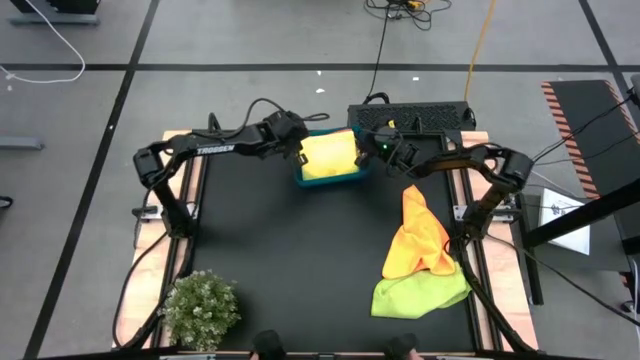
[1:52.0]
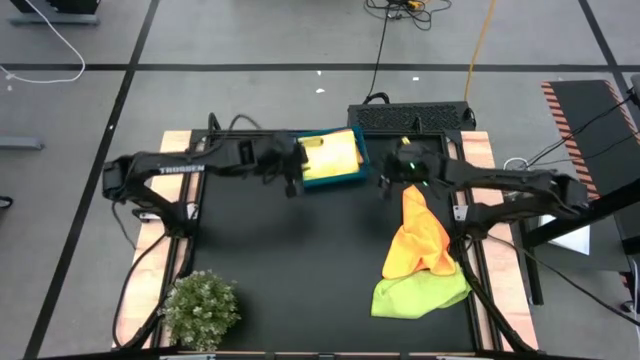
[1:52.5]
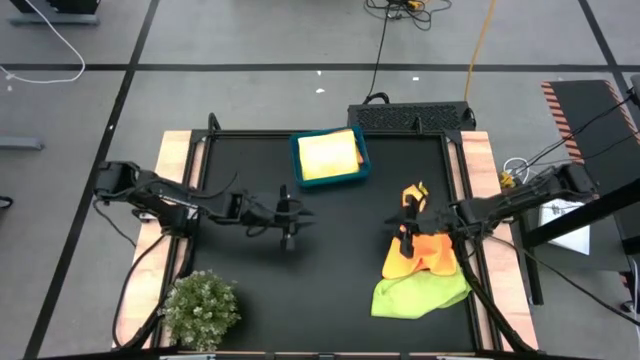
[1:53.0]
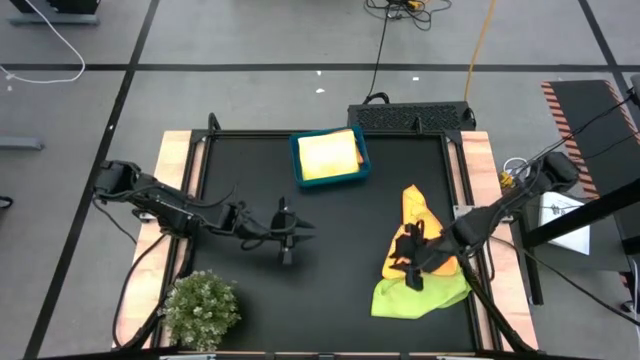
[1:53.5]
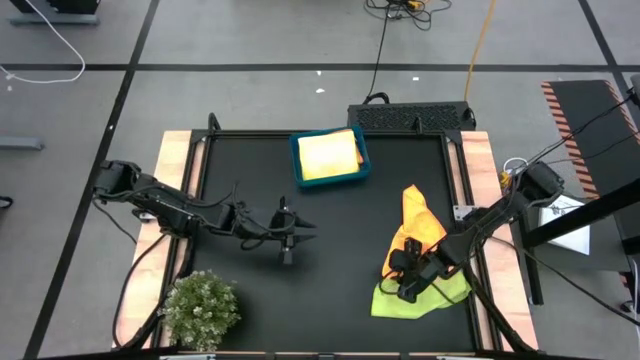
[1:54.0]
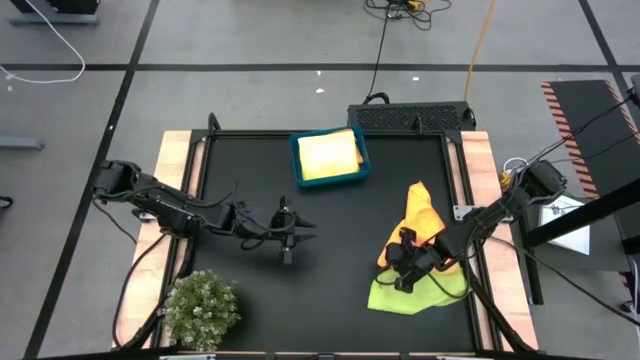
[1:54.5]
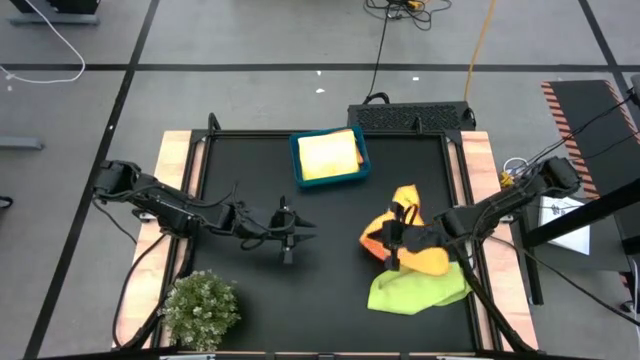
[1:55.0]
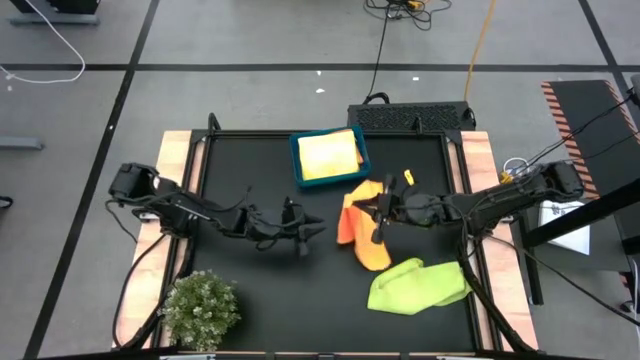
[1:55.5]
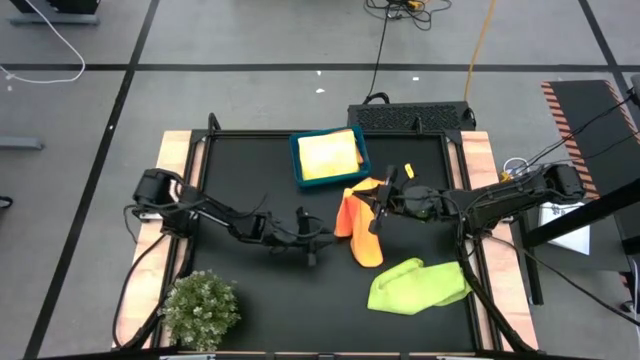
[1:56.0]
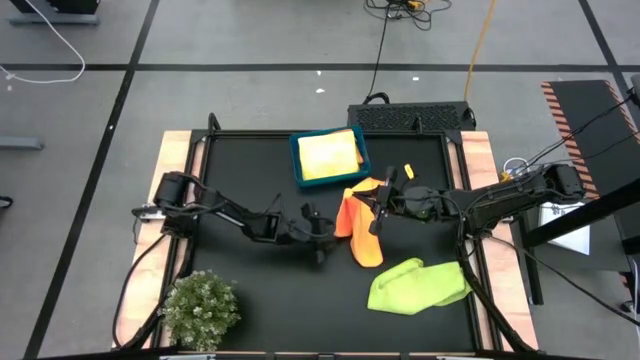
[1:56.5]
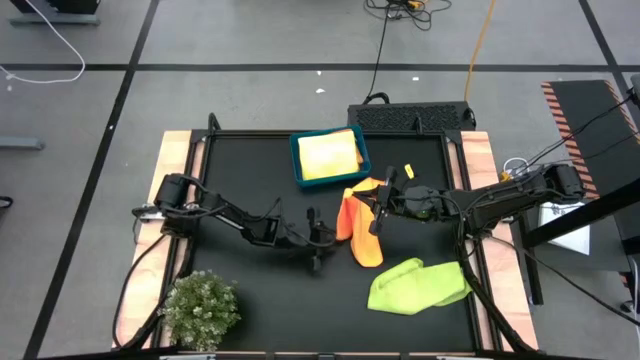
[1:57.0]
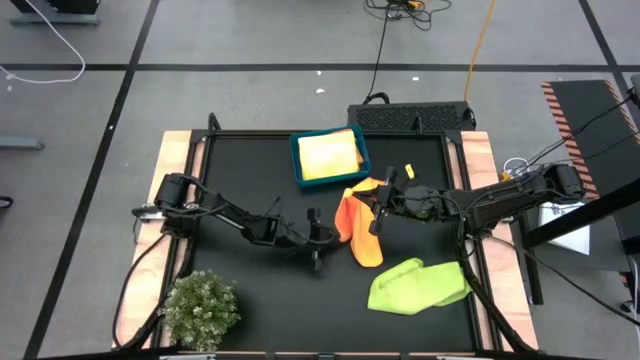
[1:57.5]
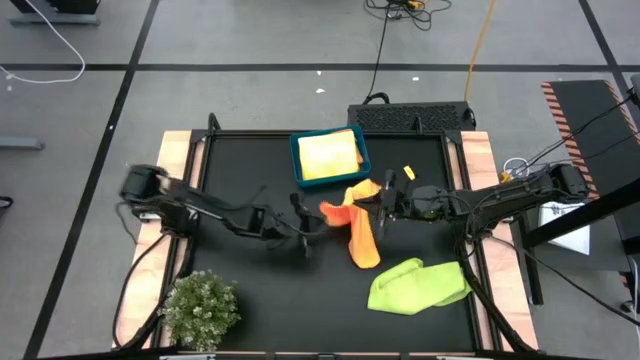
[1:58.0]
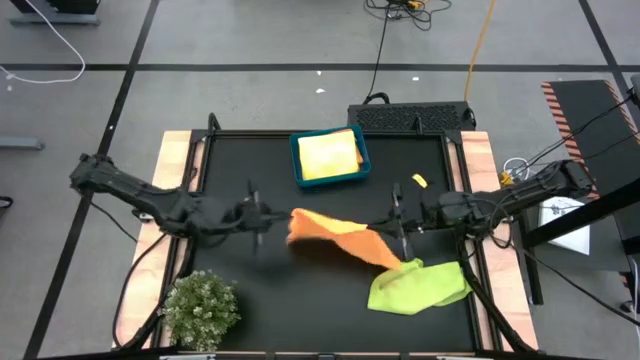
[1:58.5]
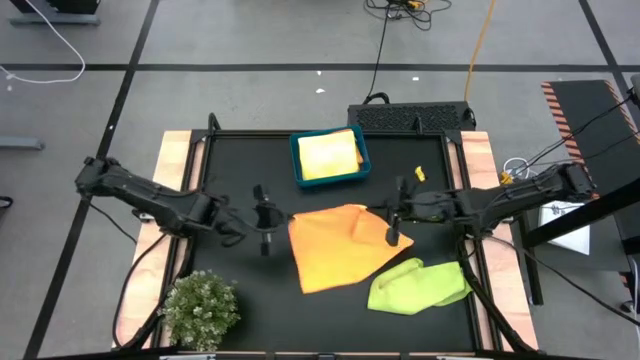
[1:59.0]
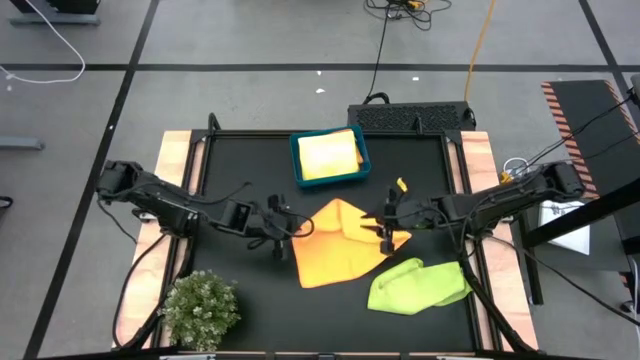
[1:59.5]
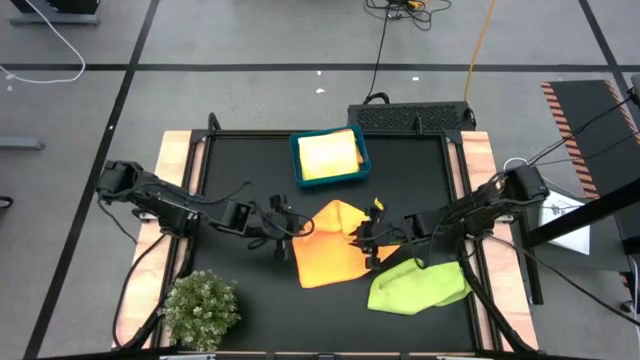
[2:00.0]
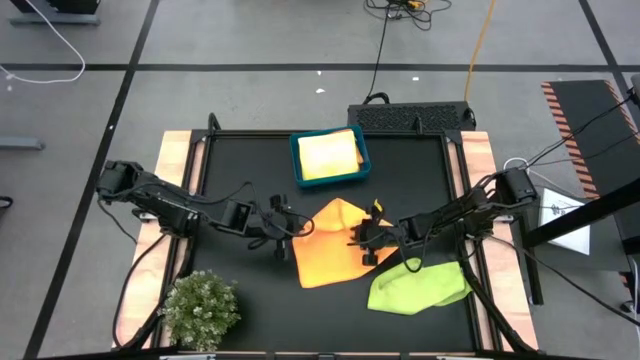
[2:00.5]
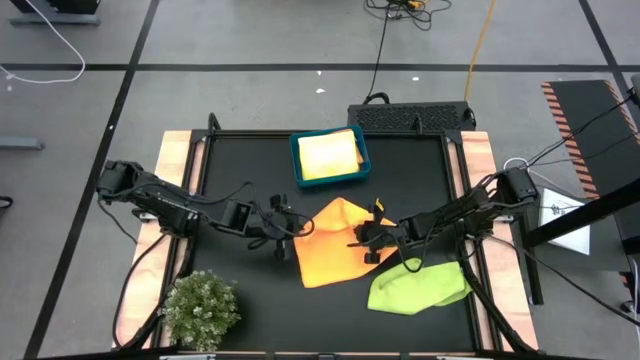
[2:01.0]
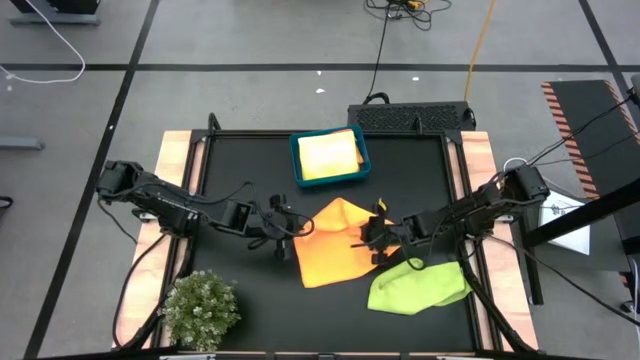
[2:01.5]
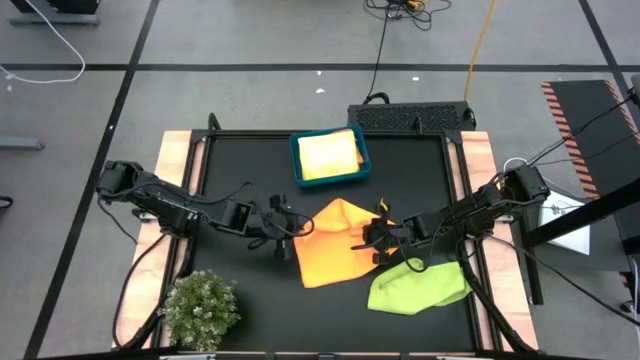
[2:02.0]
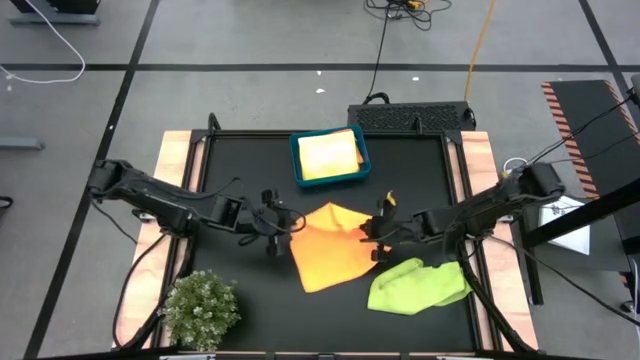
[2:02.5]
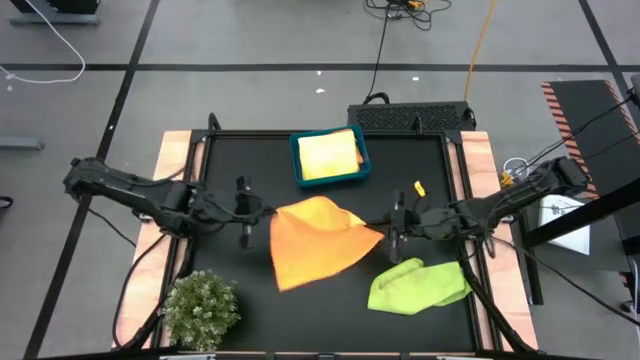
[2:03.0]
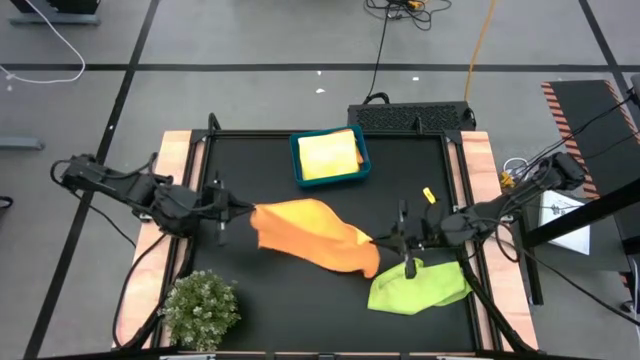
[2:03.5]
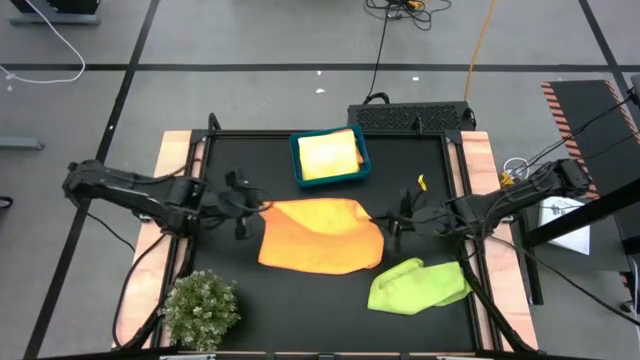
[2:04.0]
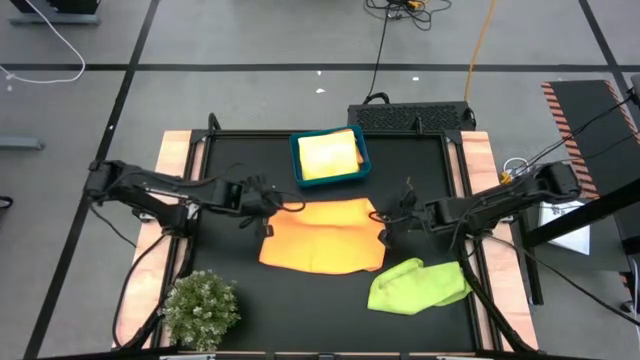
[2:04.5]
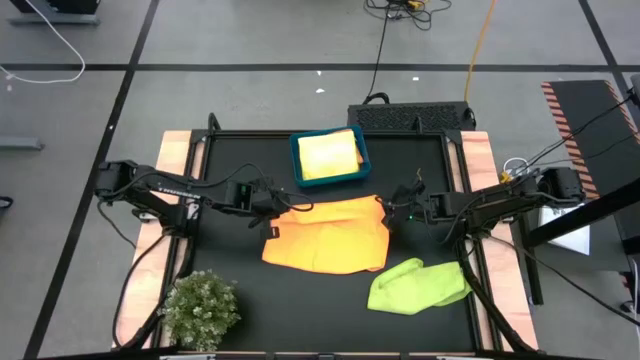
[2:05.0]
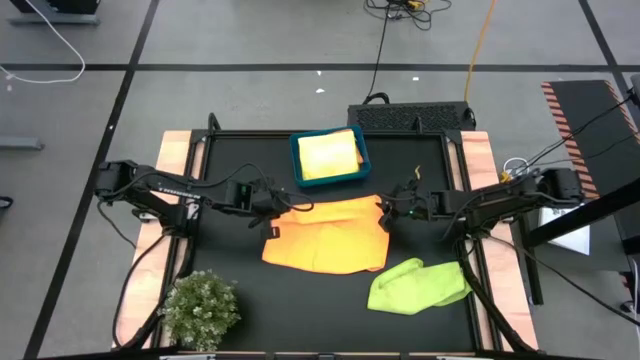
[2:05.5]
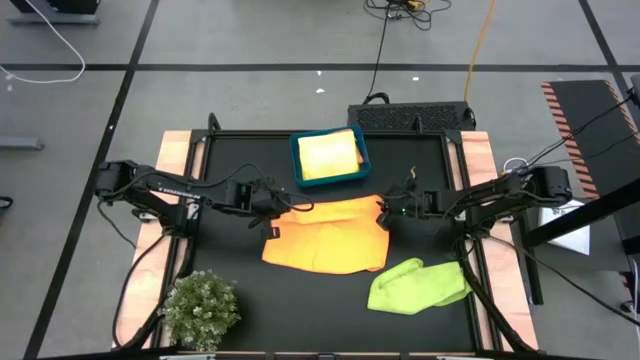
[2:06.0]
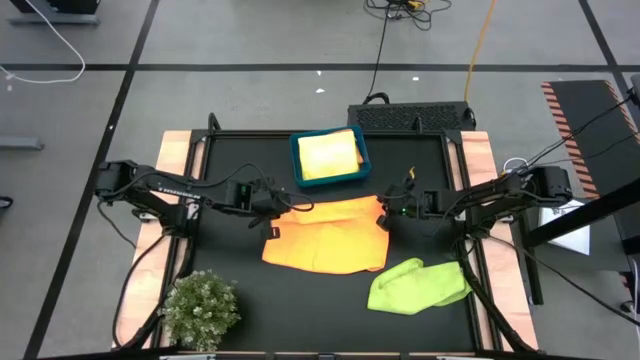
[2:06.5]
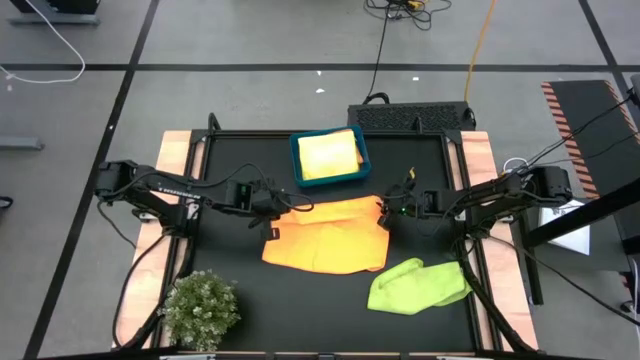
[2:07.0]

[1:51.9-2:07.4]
Task: Fold microfiber towels
Fold the orange microfiber towel

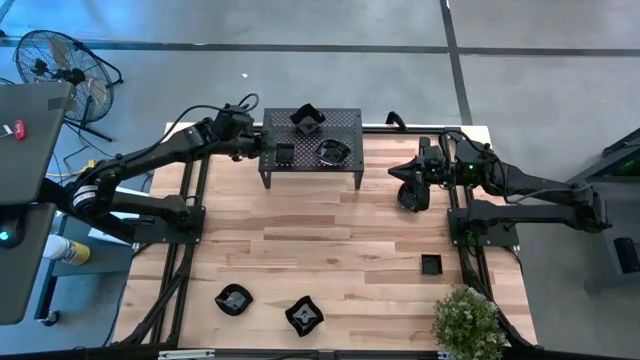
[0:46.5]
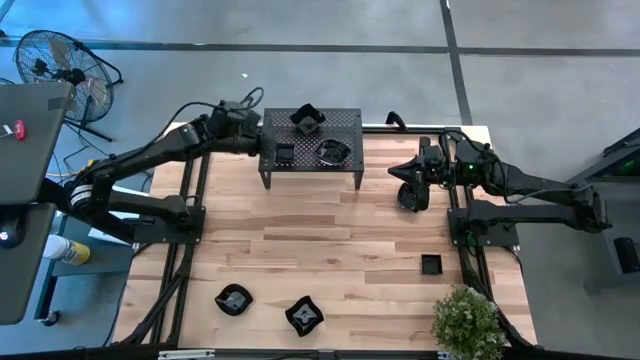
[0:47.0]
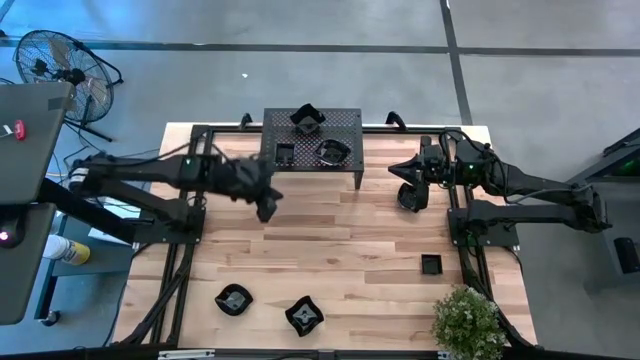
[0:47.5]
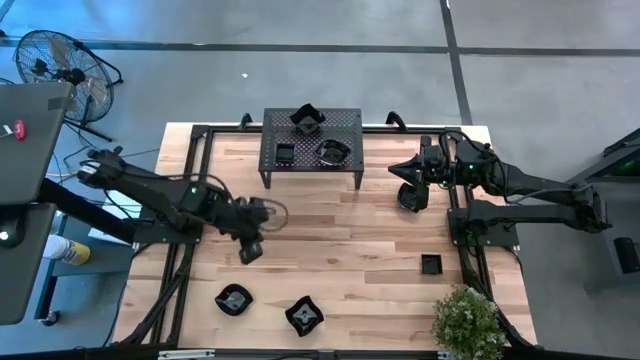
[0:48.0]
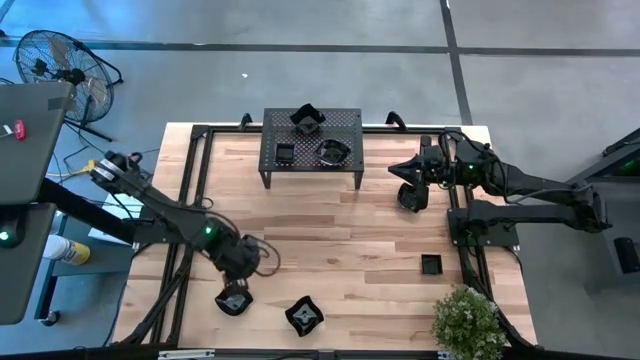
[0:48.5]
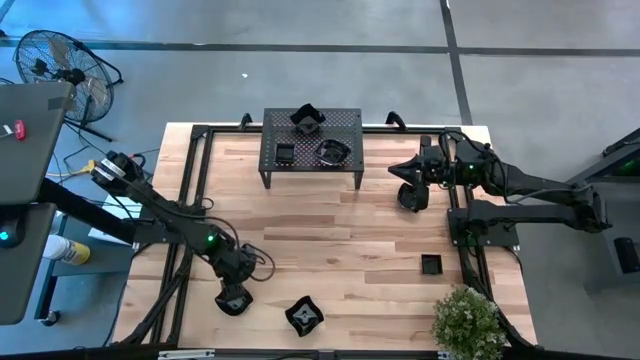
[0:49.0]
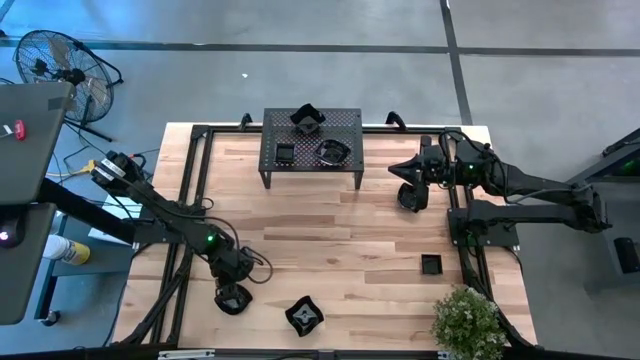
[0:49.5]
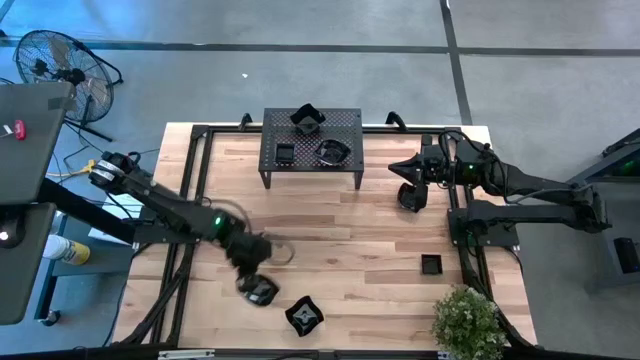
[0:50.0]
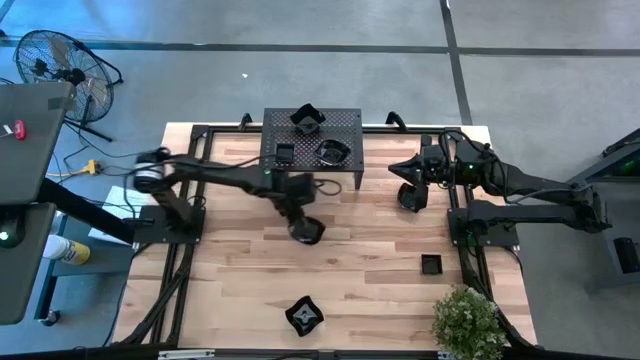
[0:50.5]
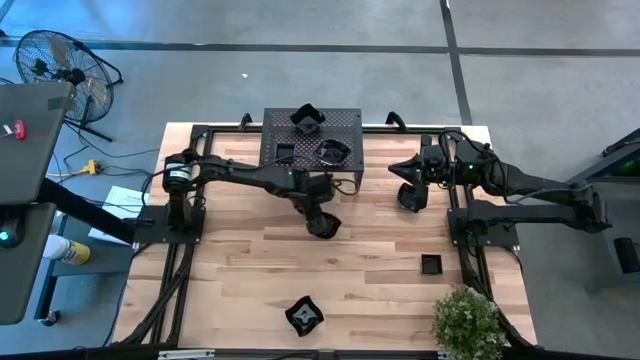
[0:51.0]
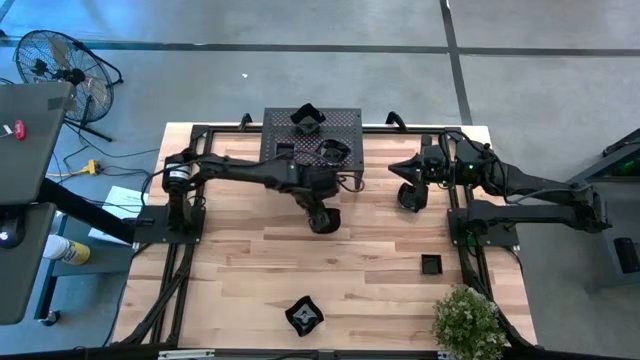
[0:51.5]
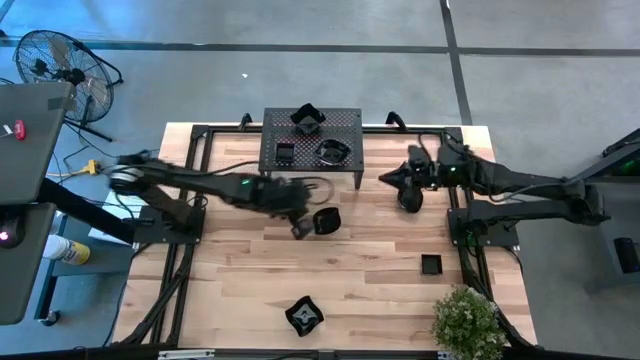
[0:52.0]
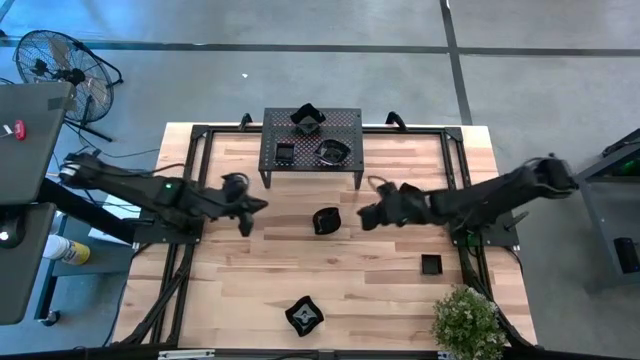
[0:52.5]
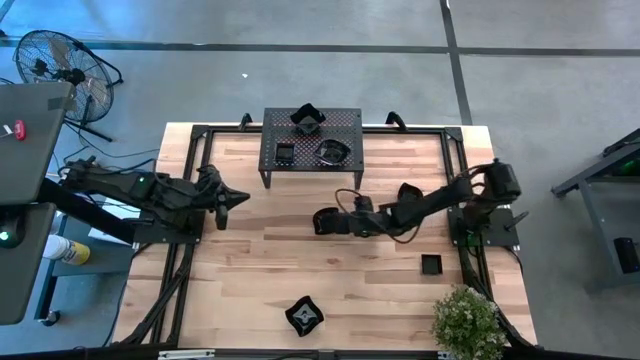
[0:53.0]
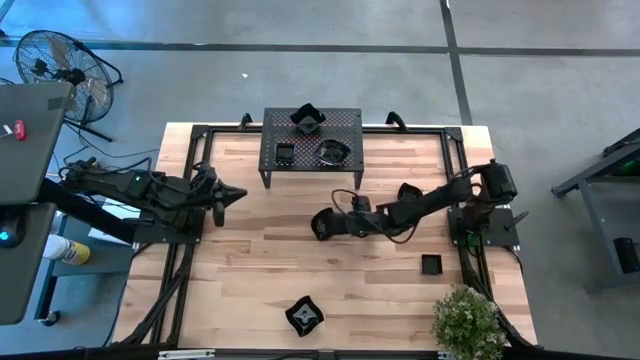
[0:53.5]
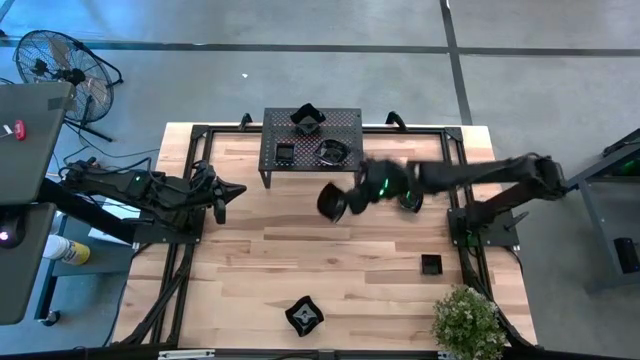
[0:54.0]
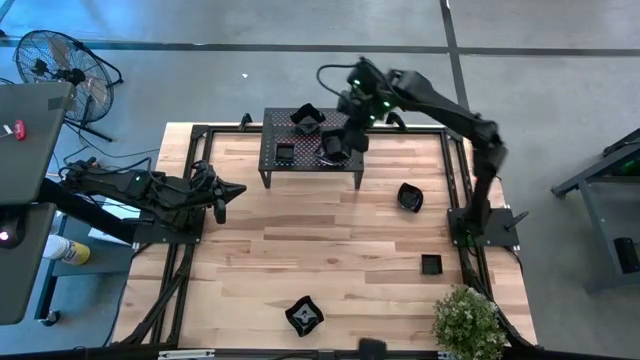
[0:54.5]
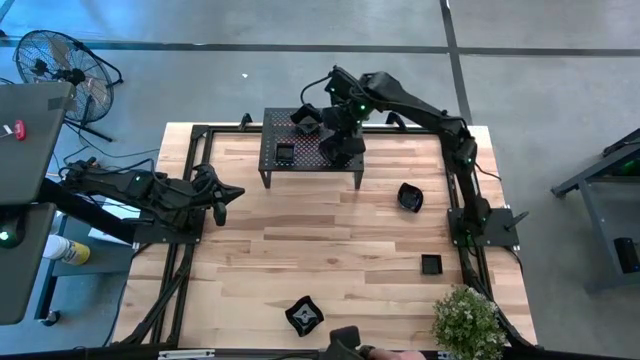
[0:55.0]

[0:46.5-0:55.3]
Task: Pick & Place Mini shaped plates
Stack the black leaf shaped plate on top of the black leaf shaped plate on the shelf
